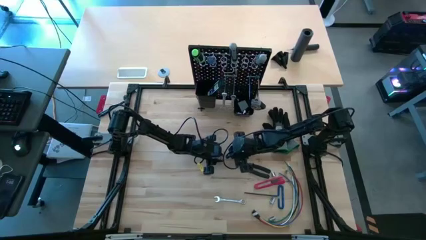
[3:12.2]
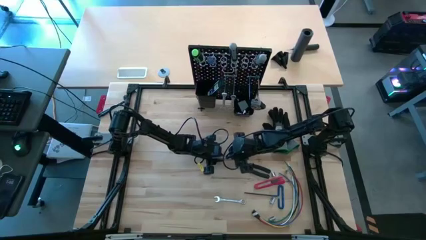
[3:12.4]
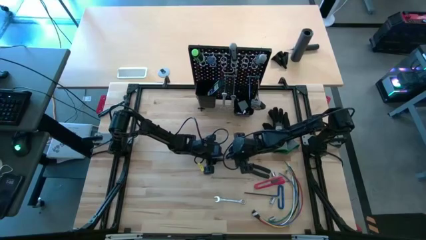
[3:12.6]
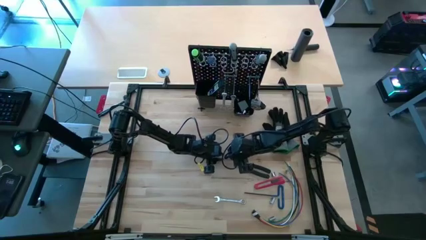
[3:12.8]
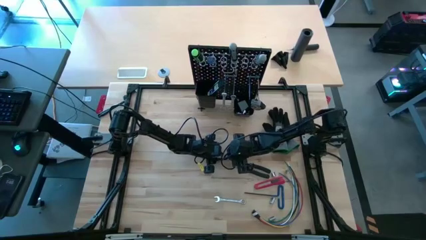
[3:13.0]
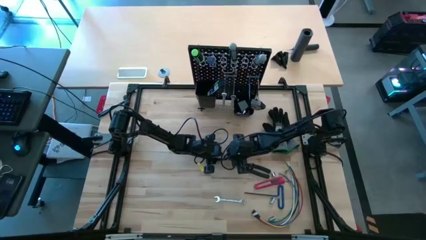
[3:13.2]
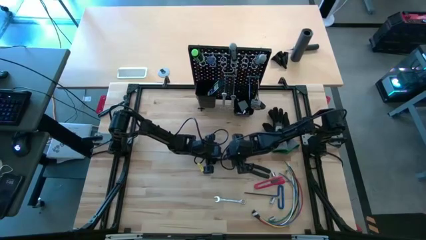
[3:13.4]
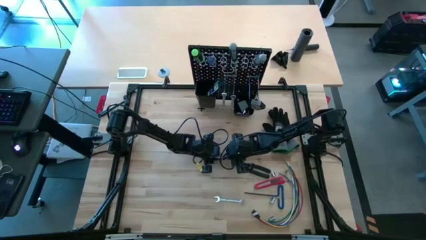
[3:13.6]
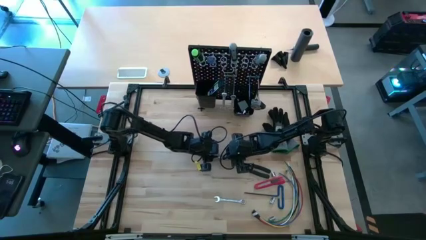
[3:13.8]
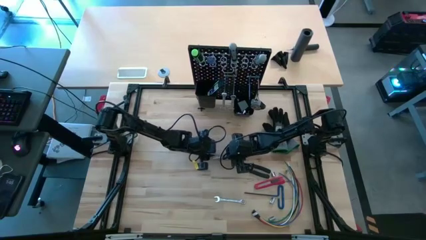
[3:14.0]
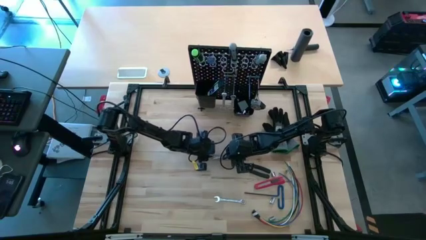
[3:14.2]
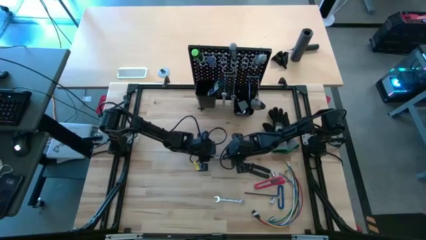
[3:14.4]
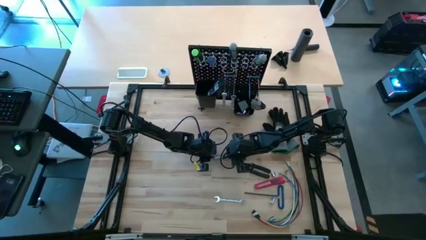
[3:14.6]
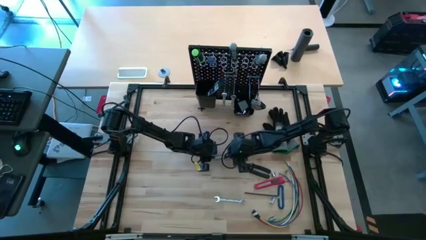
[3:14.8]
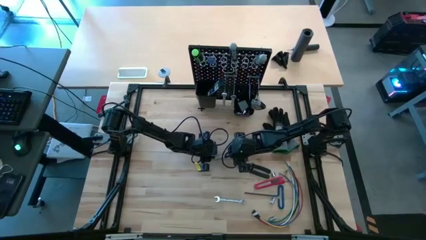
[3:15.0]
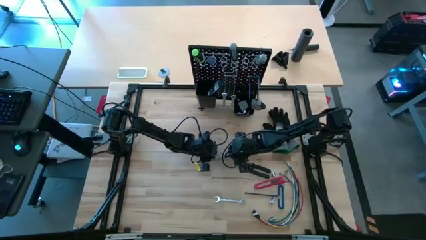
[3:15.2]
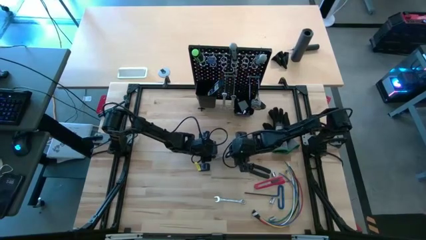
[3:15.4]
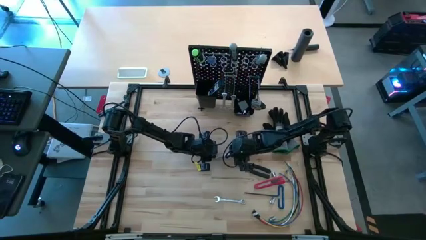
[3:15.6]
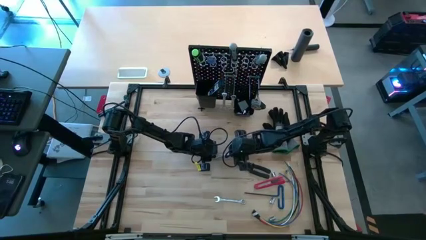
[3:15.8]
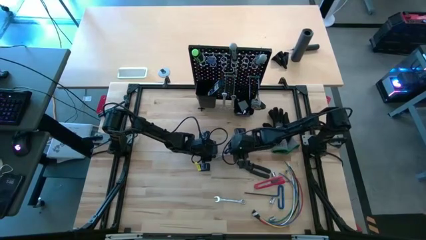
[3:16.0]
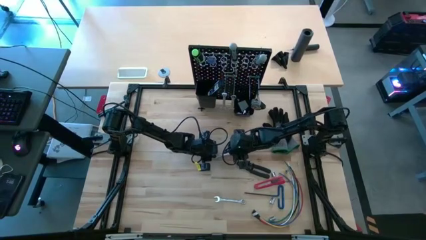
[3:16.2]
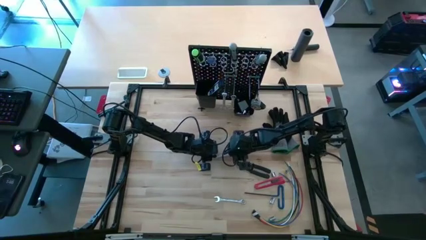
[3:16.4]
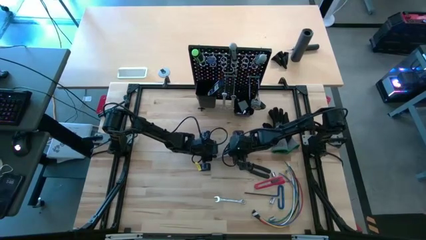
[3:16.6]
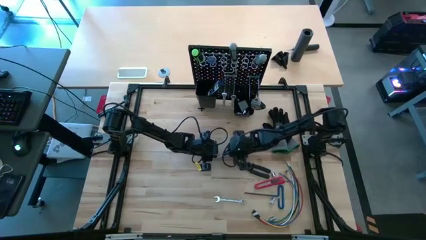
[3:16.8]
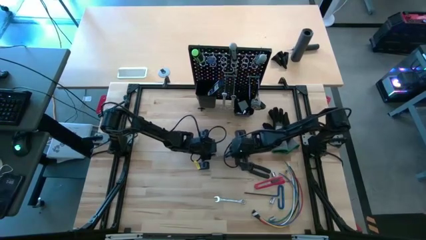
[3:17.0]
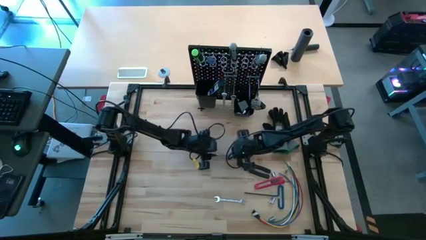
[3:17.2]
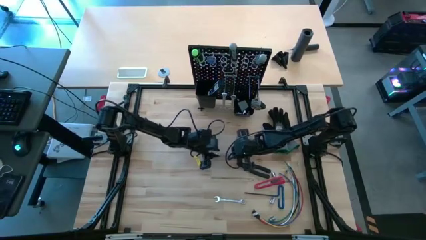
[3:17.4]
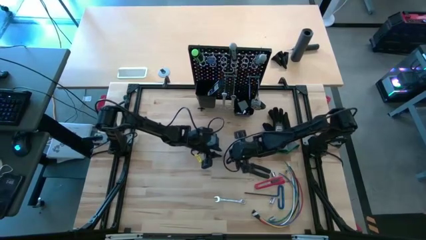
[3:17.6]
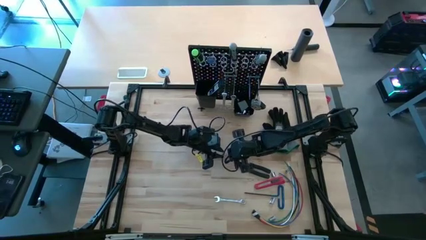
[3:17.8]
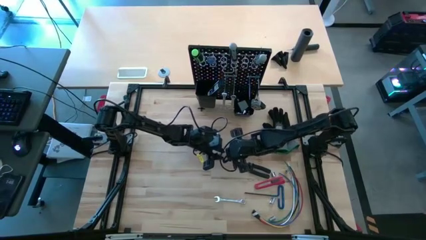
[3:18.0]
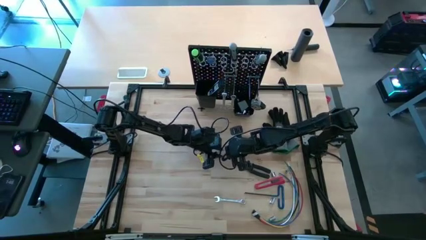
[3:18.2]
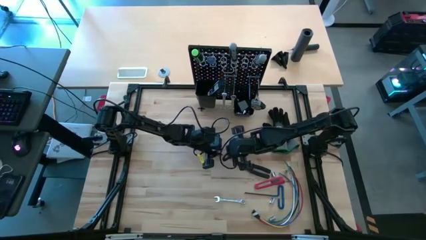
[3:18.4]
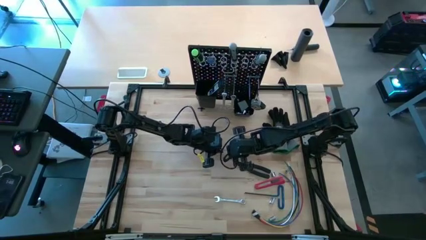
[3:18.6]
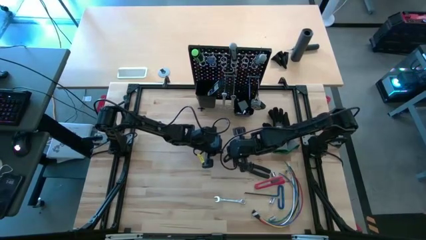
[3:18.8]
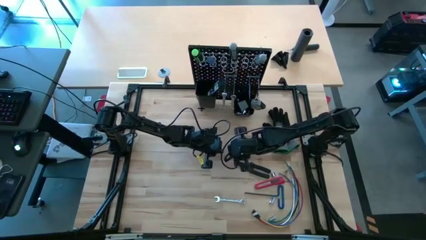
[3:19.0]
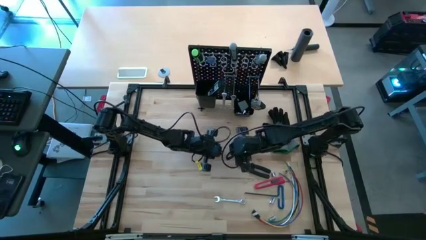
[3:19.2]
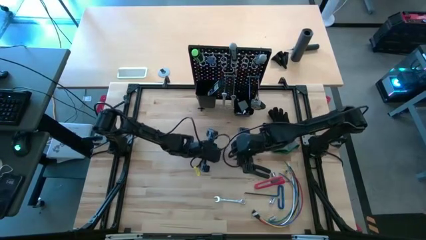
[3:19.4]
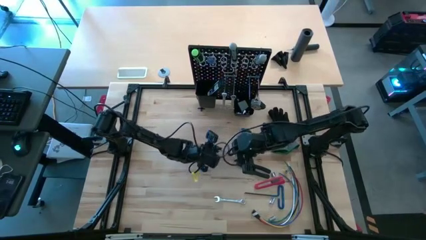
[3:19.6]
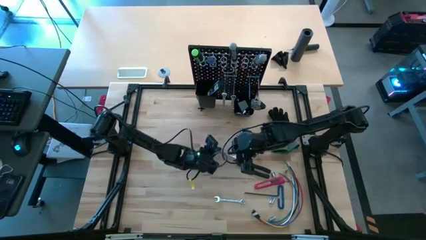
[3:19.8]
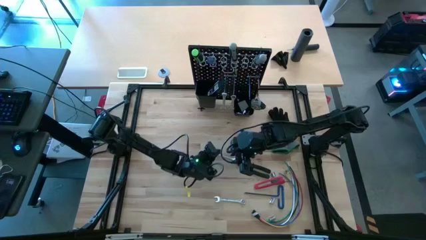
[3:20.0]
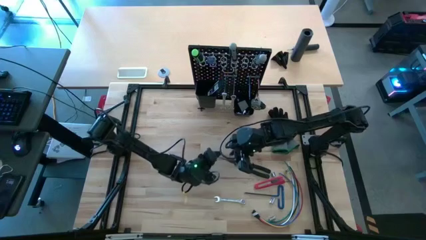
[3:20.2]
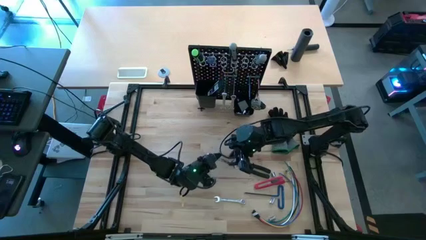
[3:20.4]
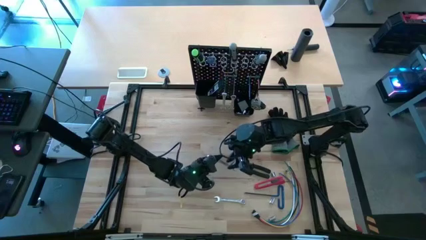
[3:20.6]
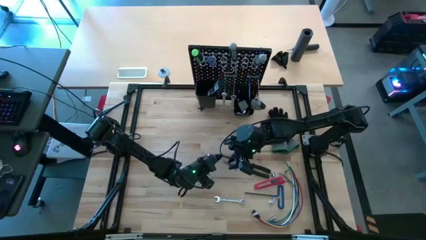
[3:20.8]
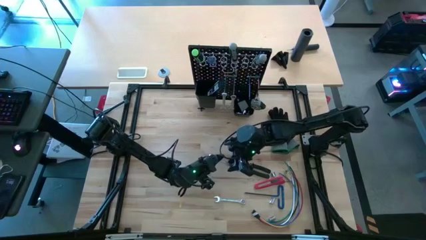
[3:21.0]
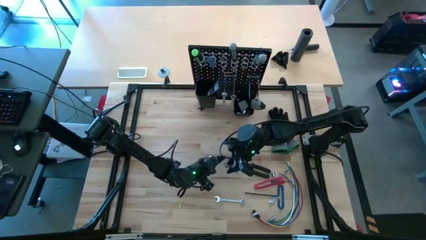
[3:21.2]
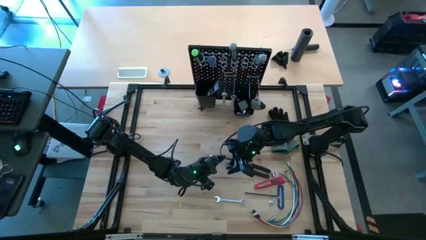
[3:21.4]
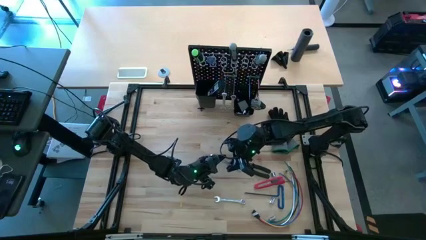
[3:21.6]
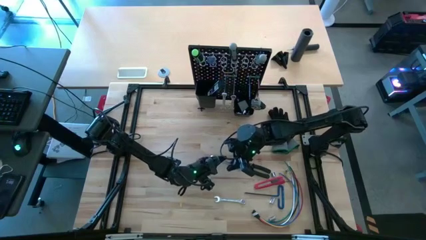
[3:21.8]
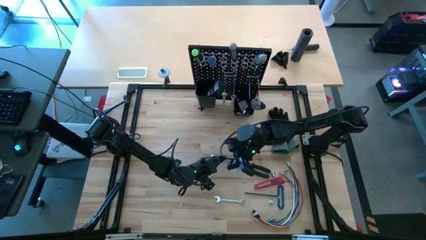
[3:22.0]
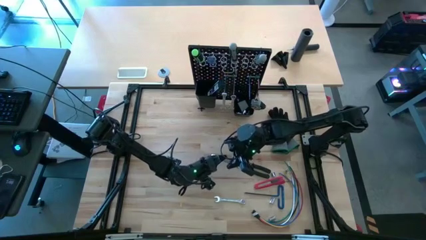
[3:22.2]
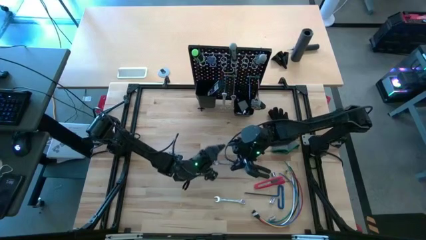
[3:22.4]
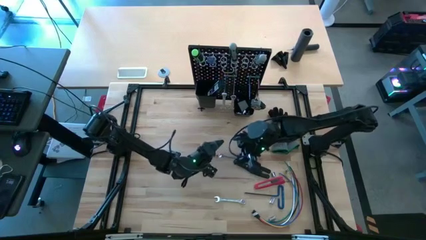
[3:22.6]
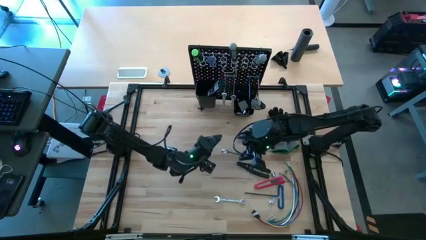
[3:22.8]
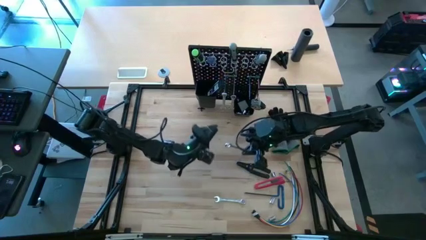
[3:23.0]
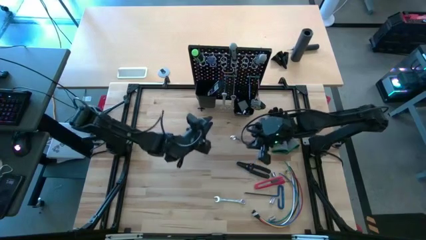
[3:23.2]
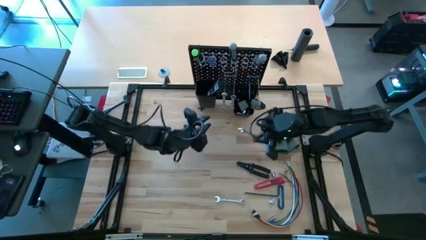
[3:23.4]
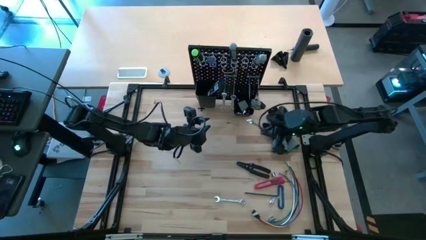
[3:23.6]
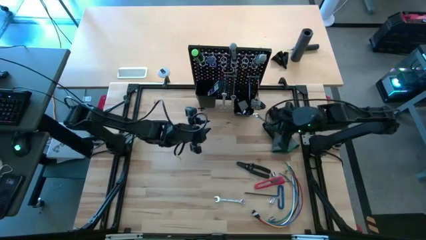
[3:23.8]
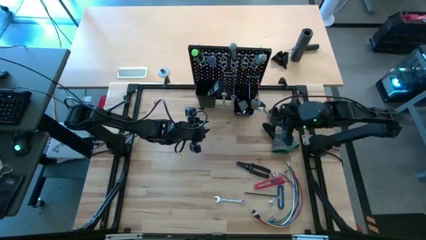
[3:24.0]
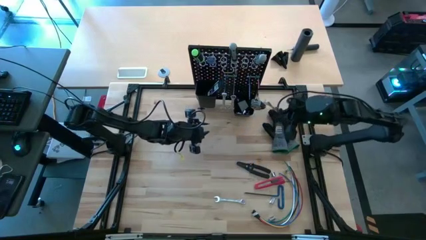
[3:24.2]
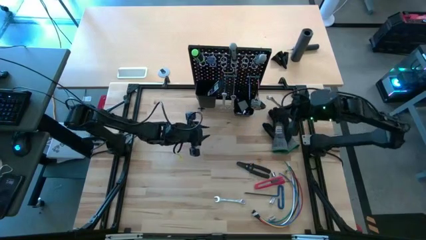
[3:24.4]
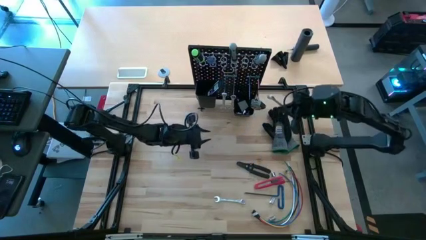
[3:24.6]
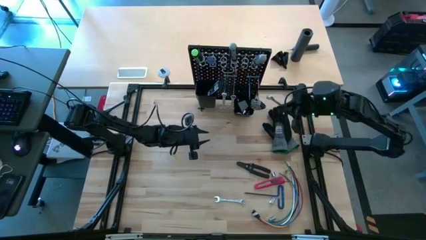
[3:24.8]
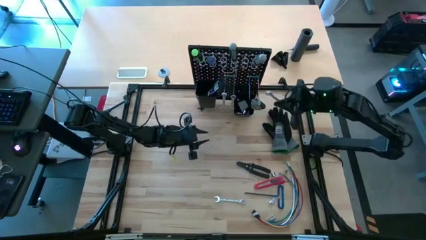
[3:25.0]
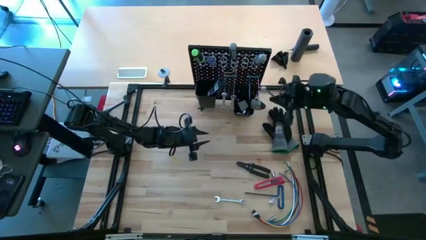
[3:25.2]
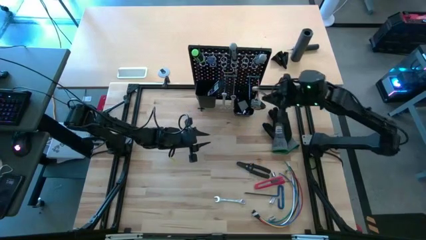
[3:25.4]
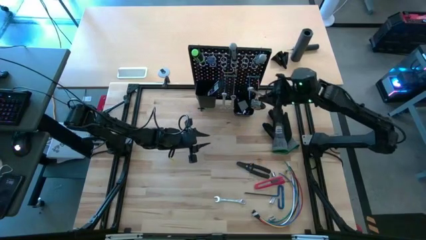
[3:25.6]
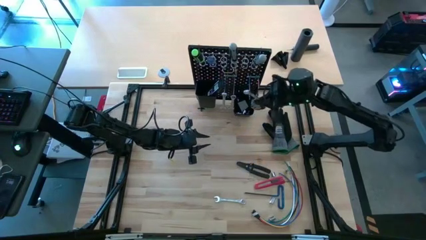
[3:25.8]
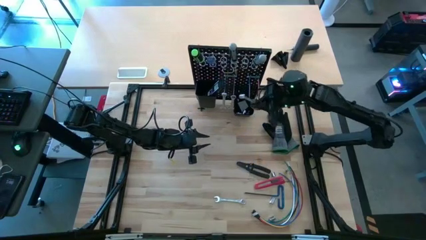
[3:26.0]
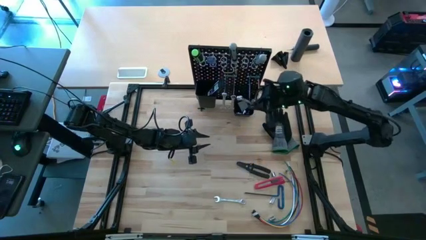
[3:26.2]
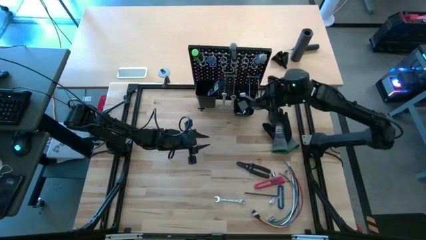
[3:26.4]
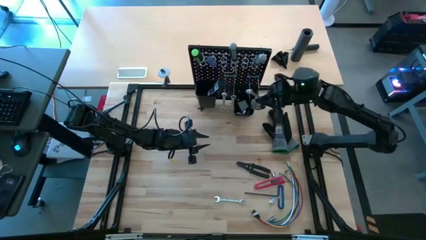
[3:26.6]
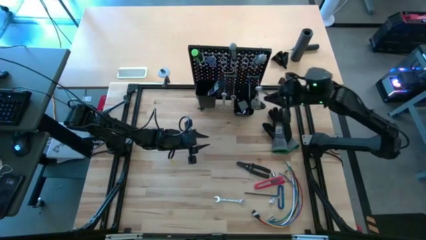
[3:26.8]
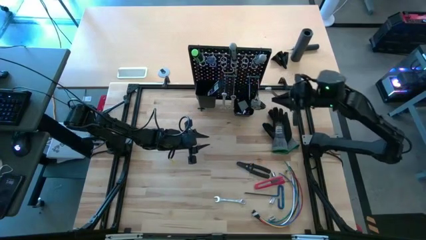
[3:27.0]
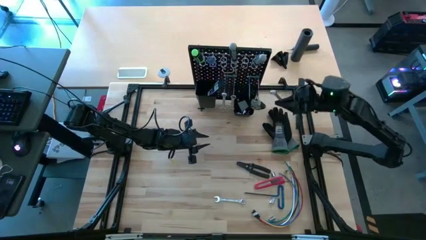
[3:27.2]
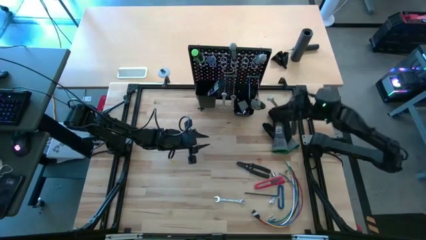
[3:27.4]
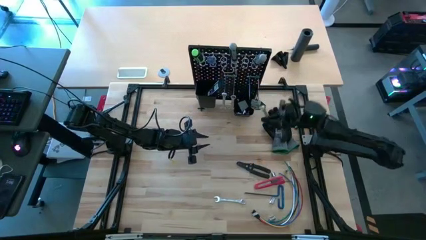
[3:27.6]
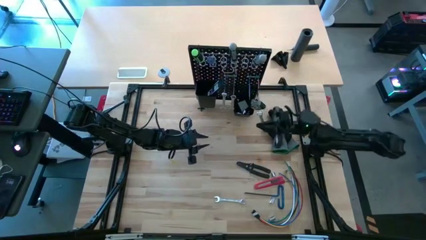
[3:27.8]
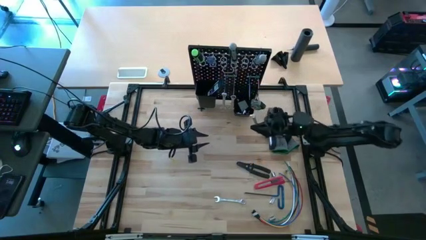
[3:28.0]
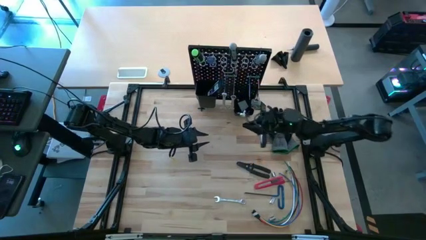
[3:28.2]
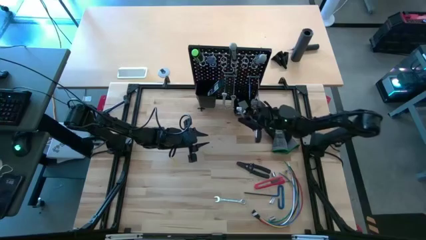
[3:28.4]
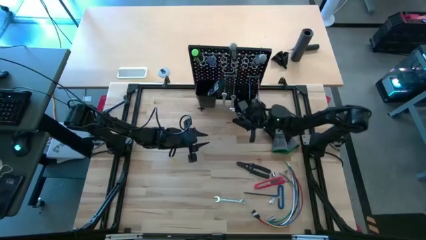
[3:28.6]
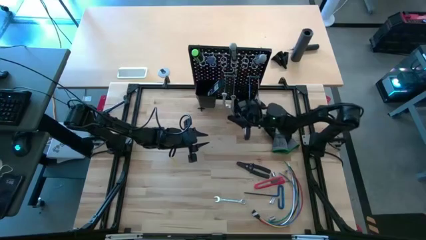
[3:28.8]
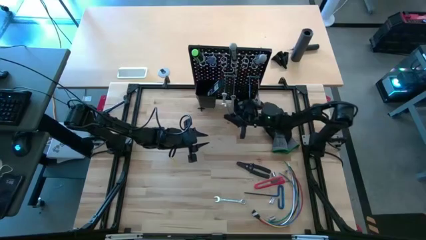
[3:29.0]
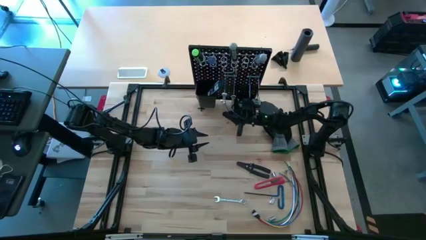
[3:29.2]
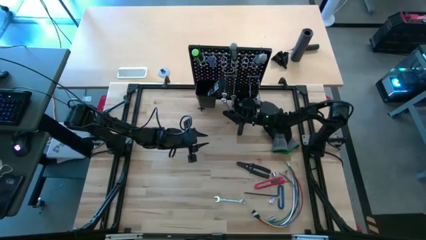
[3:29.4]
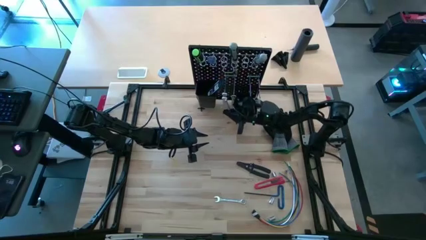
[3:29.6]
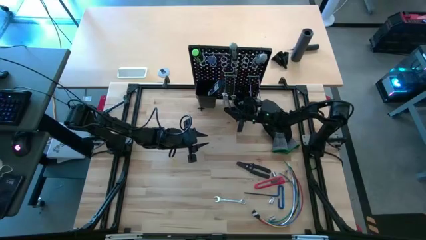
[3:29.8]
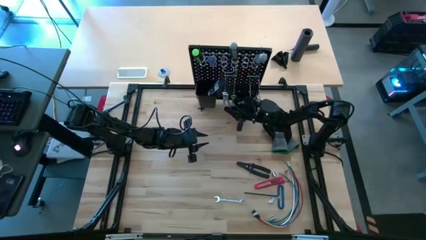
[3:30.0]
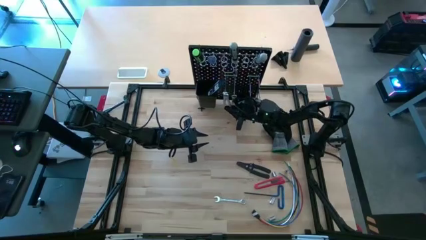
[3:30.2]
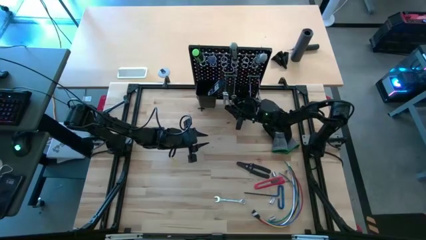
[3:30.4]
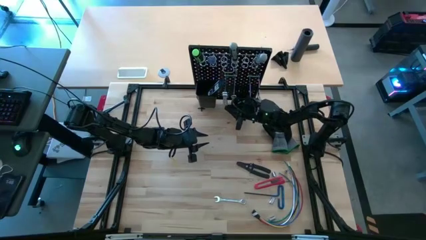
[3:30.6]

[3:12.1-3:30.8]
Task: Hang tools onto peg board
Hang the silver wrench on the peg board
